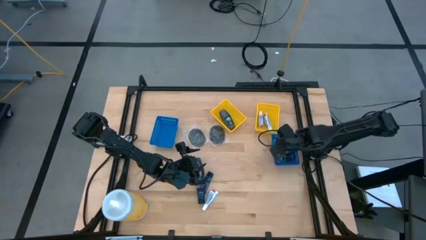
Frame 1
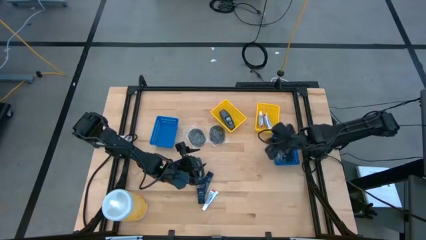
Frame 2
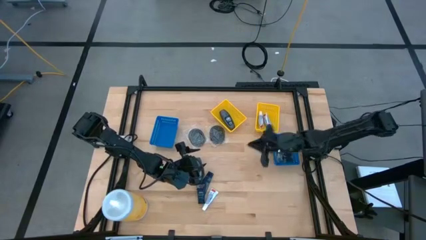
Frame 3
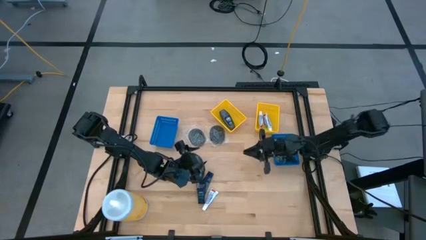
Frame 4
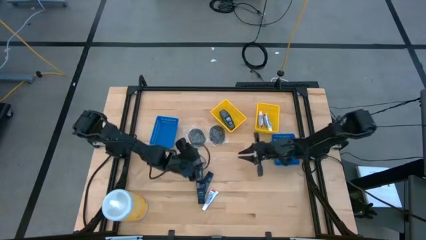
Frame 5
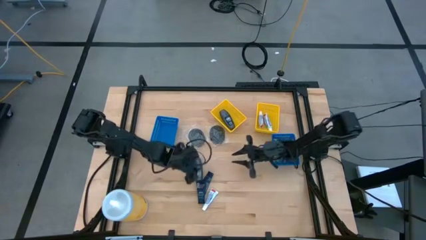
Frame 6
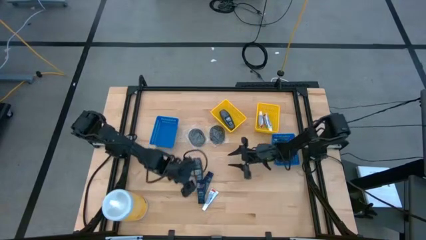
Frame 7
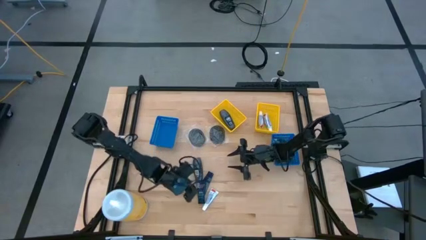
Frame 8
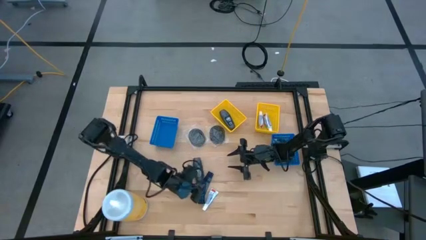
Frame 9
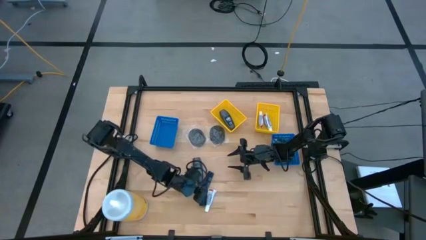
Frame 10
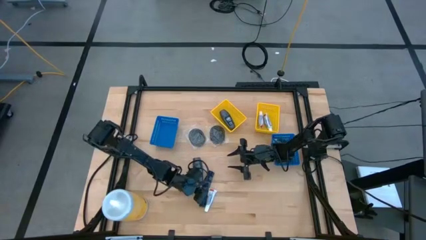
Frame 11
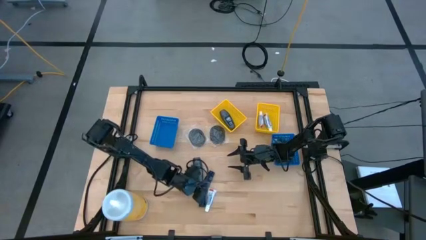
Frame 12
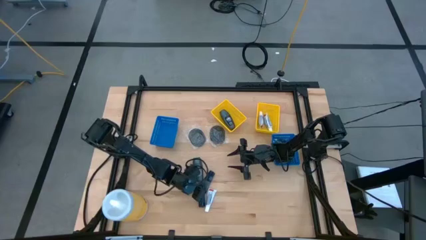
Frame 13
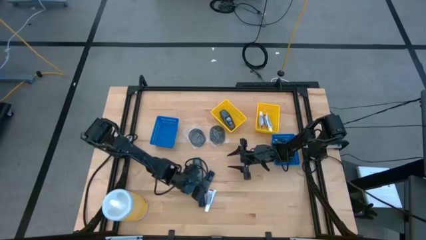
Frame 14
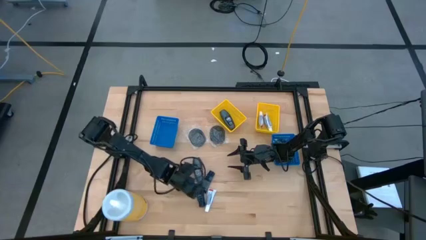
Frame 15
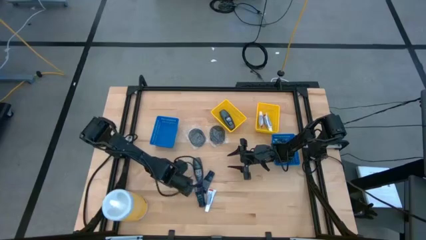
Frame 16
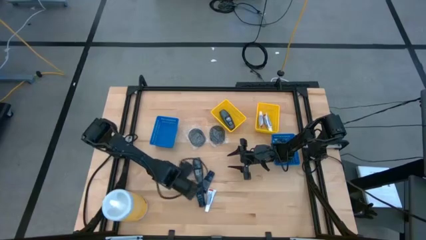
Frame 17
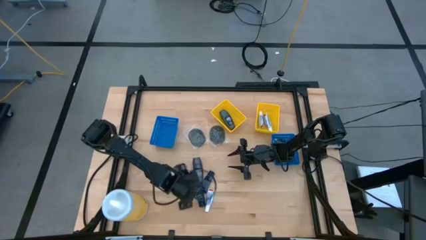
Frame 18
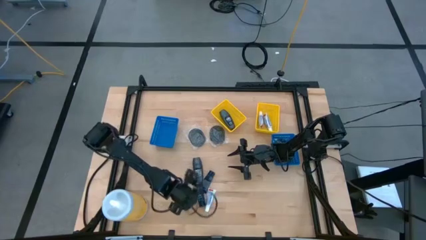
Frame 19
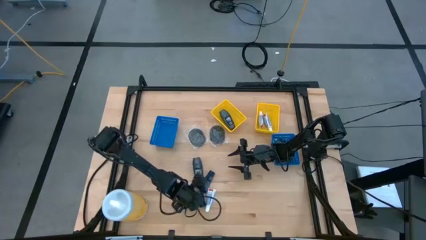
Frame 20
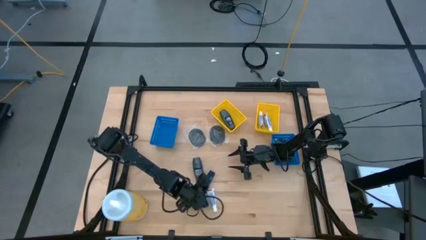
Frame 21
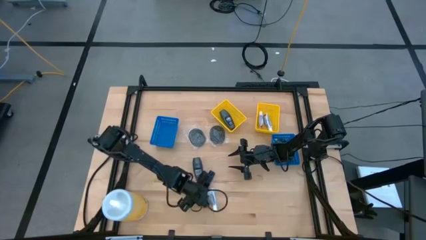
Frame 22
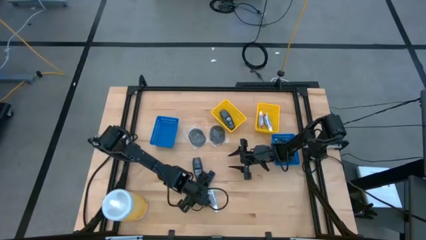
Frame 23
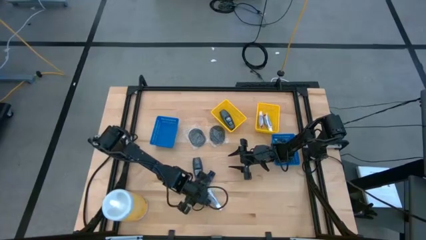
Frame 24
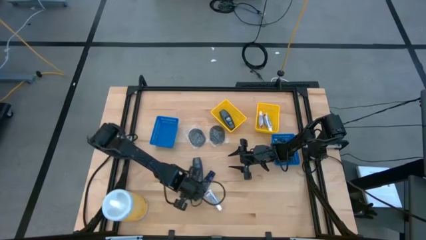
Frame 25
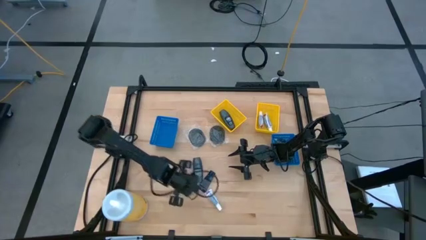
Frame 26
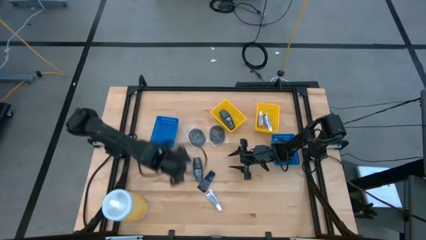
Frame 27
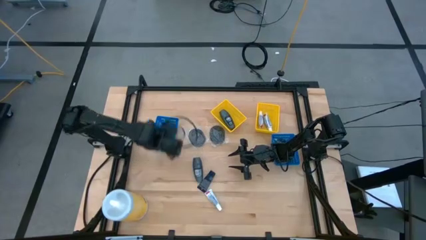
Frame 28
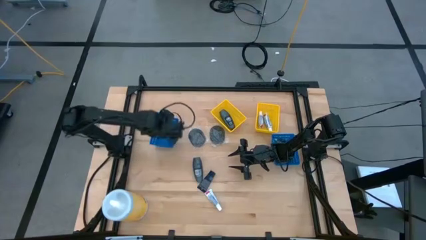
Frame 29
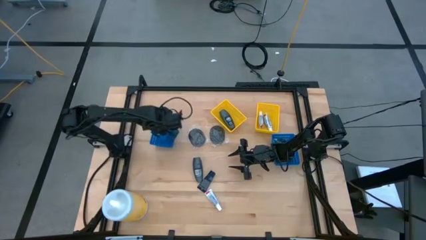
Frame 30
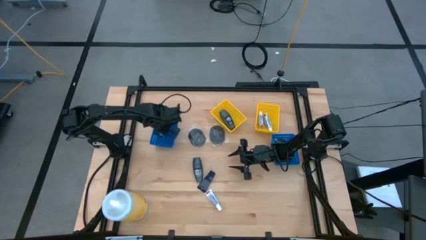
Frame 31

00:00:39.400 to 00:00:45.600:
Task: Pick & Place Travel size toiletries
Put the bottom blue shave cream into the left blue bin

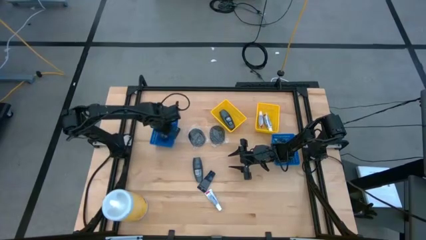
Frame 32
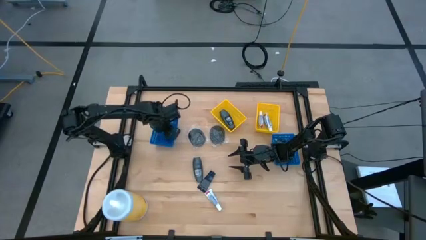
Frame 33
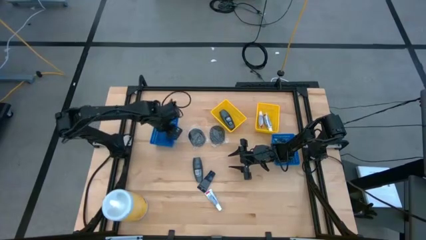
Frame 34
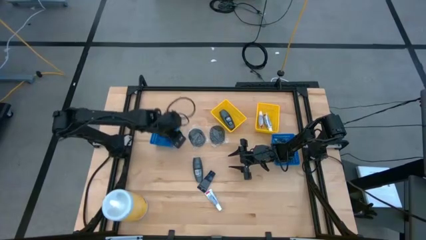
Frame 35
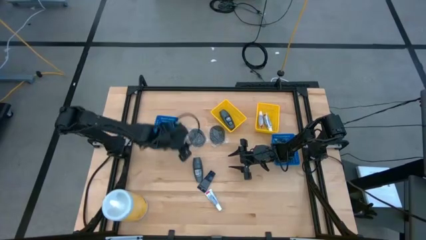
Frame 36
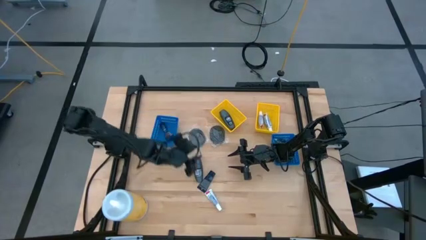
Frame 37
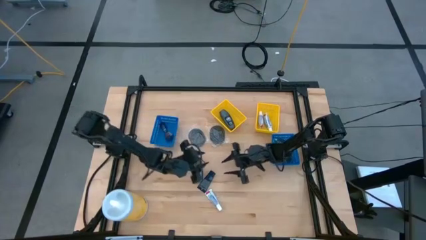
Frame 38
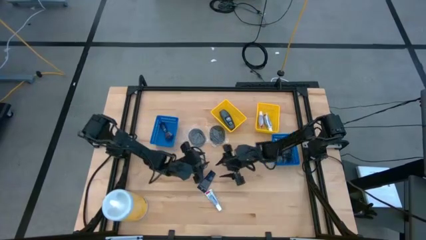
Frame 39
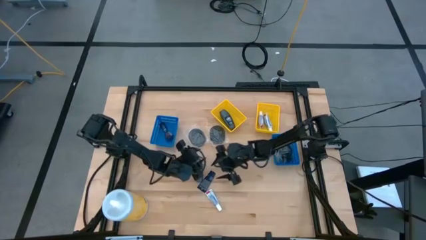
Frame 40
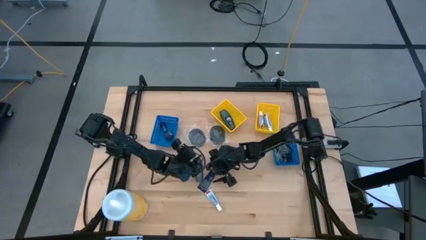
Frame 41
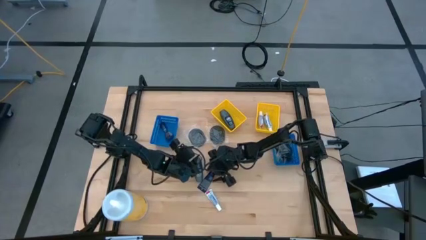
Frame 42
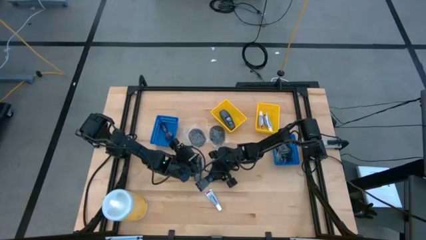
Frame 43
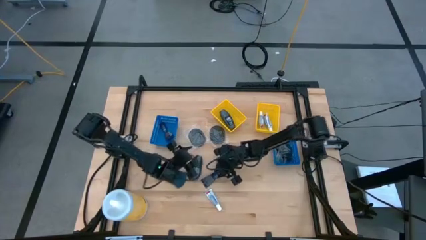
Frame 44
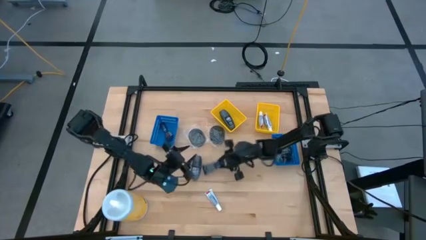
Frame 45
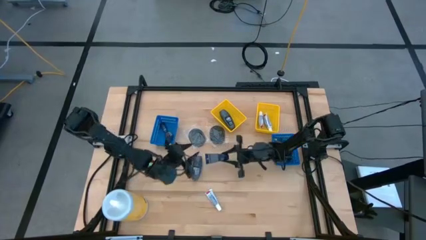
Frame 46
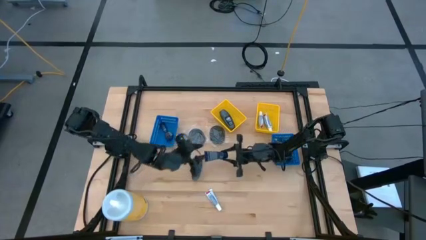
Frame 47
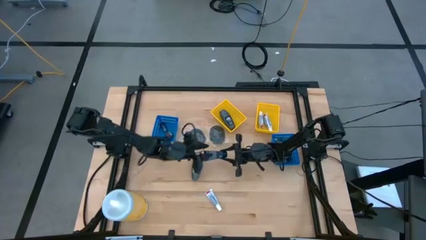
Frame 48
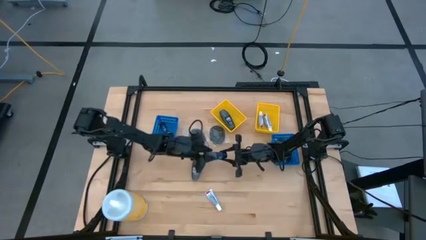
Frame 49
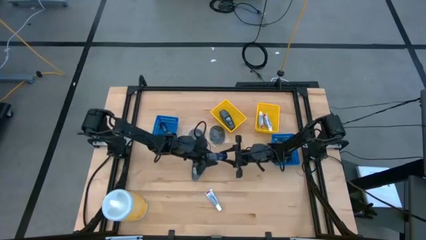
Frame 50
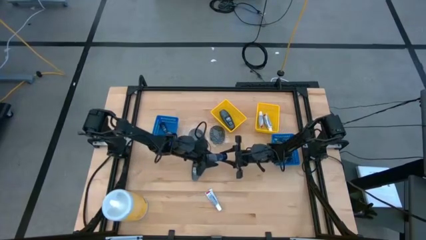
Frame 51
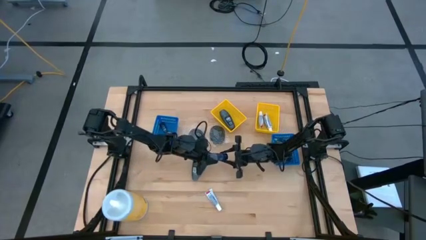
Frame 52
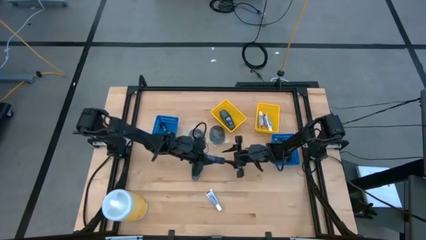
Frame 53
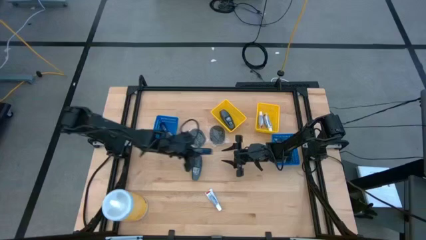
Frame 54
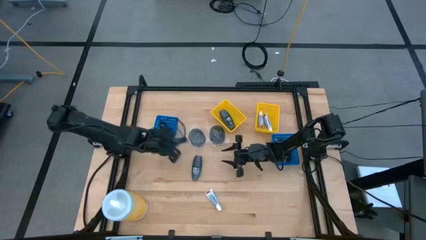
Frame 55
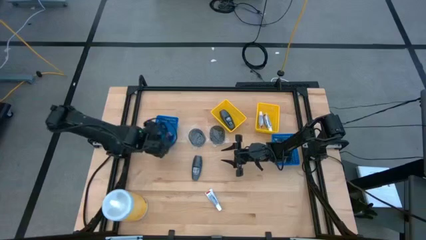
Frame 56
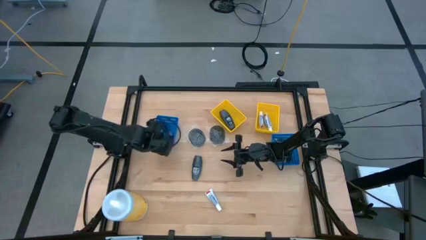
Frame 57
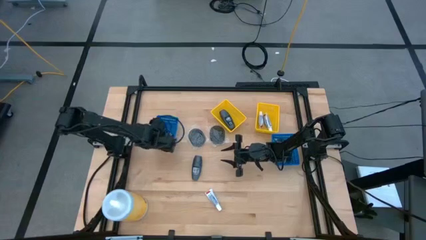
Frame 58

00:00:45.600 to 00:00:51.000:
Put the blue shave cream into the left blue bin

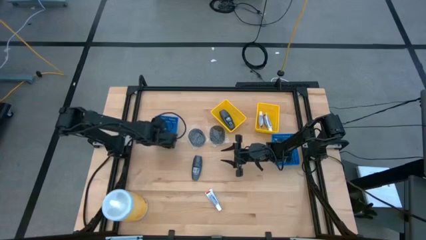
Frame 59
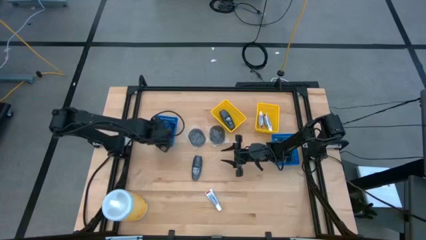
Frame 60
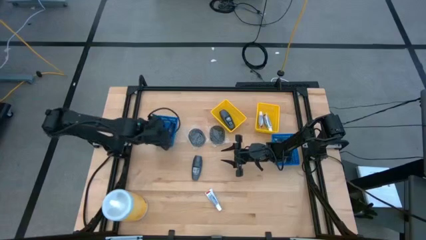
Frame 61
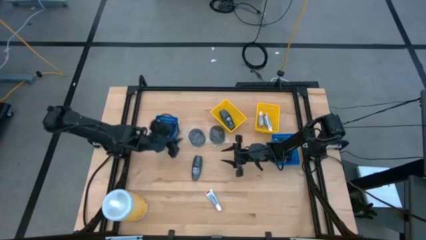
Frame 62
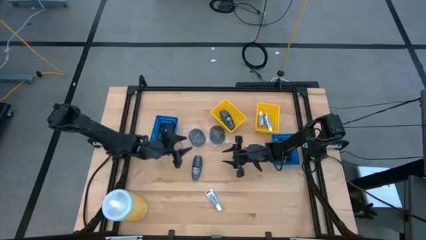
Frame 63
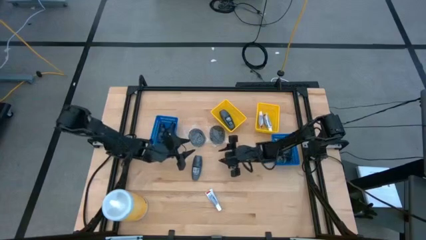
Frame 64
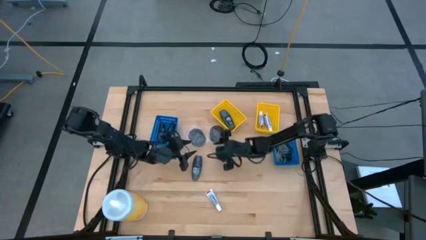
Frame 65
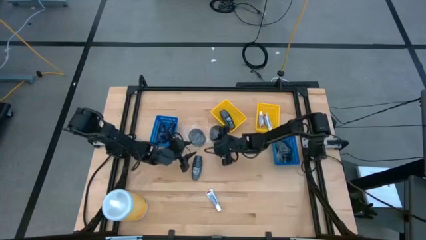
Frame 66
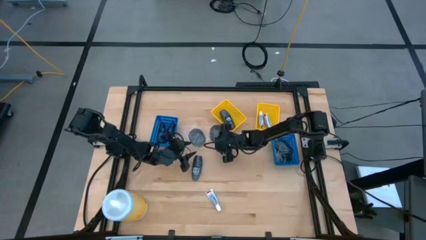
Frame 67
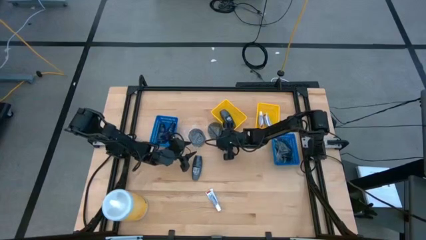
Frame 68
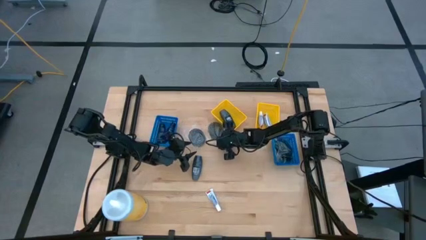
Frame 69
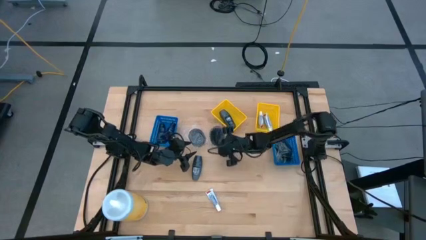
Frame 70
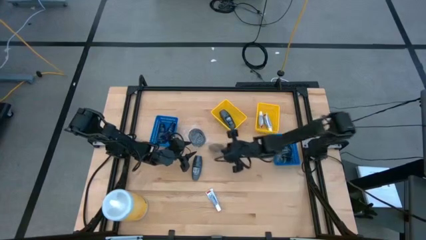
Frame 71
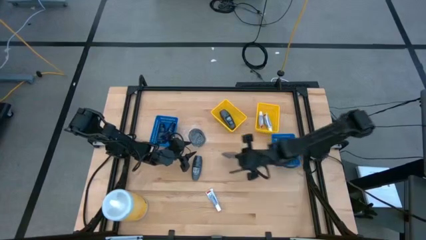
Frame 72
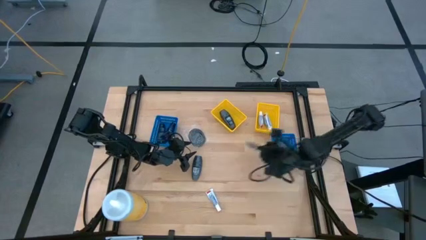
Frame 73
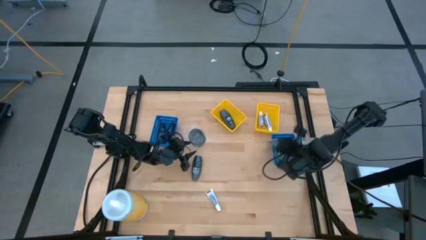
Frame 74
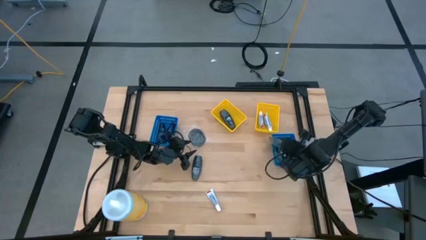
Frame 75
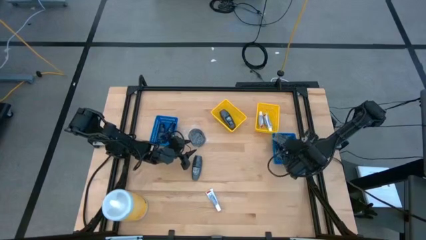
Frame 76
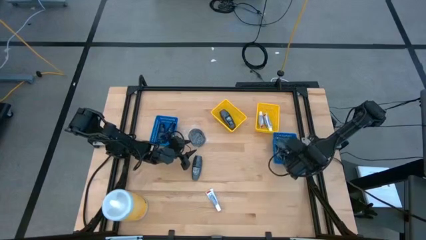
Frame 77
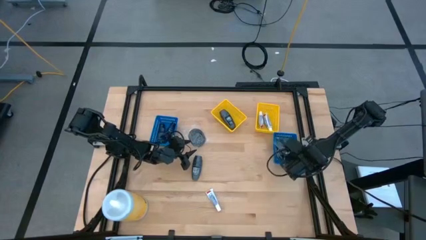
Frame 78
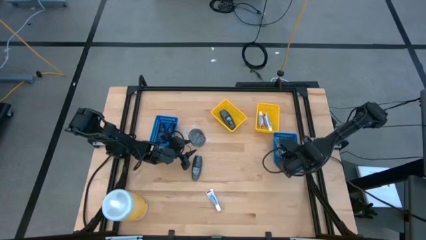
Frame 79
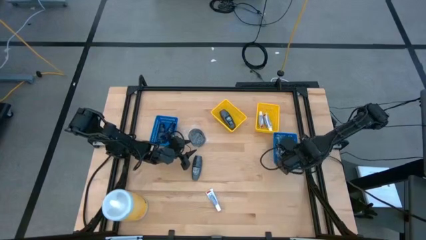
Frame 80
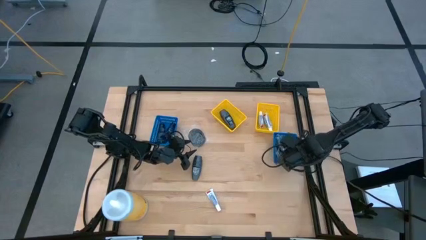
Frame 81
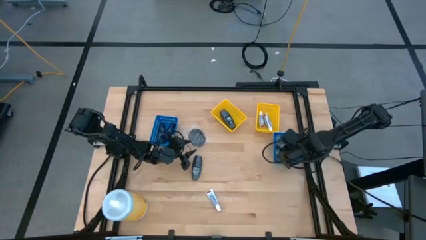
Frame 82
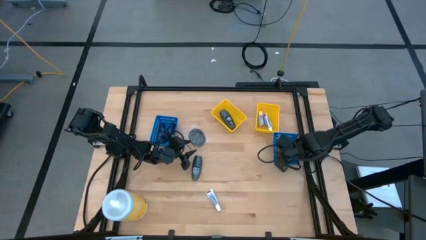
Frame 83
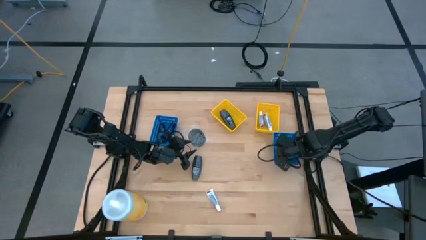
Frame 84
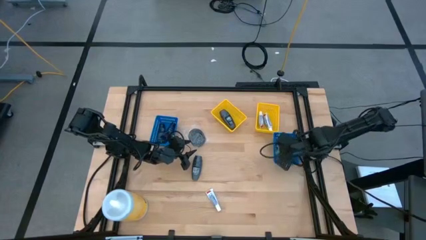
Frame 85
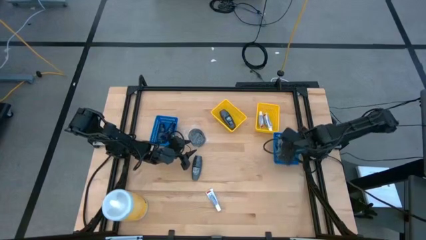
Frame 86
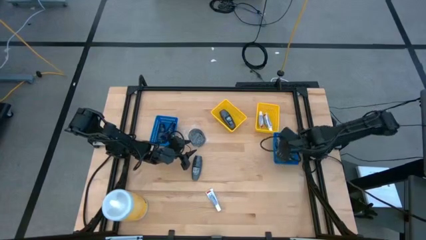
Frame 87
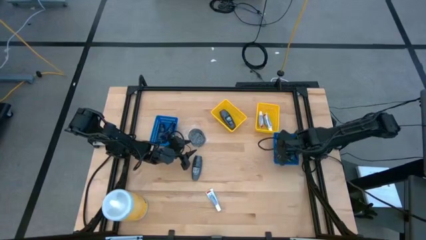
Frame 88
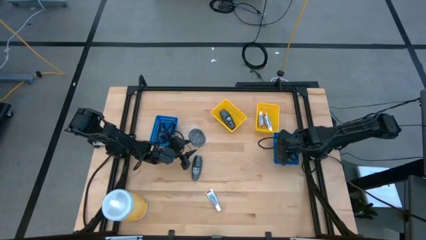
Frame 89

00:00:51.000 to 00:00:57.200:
Put the right black hairbrush into the right blue bin
